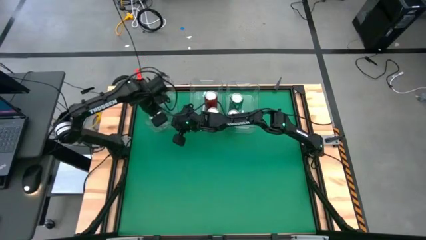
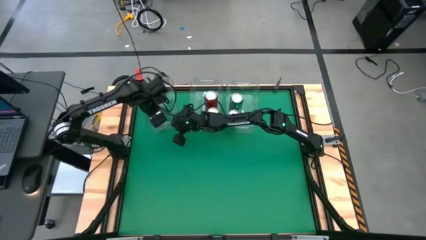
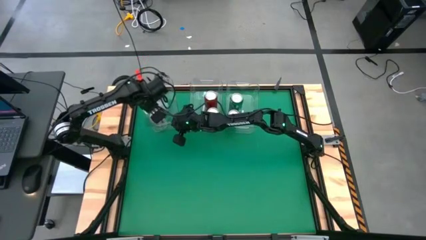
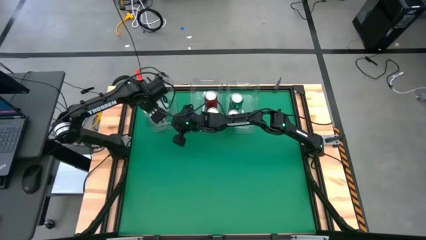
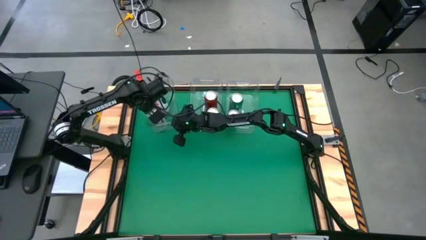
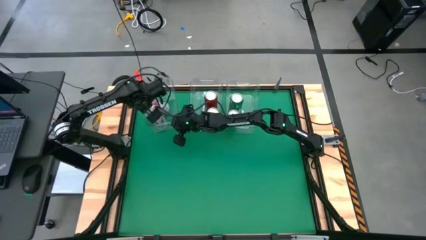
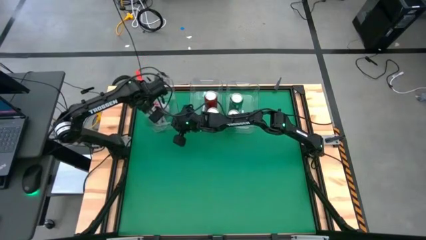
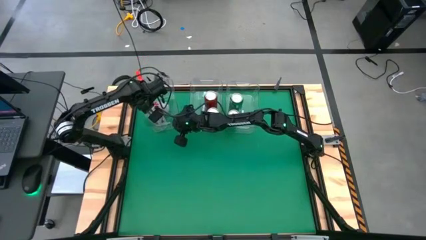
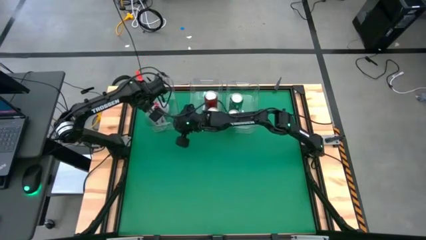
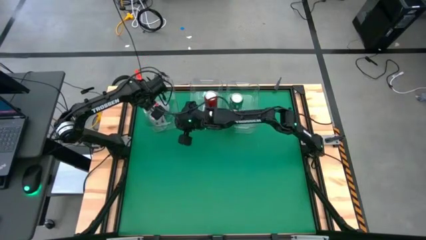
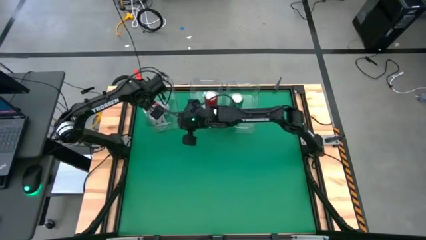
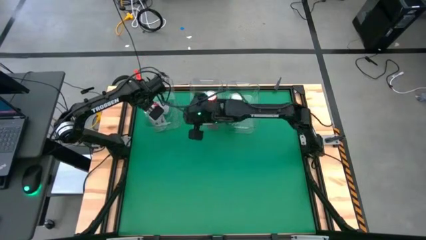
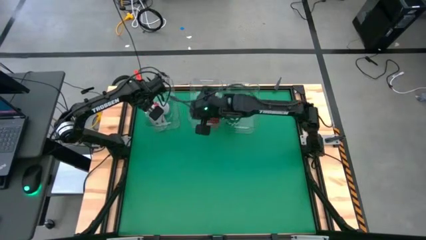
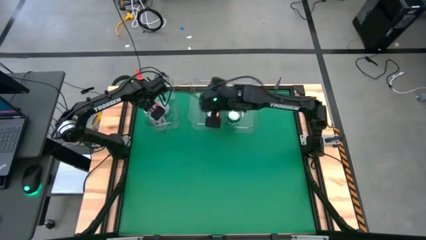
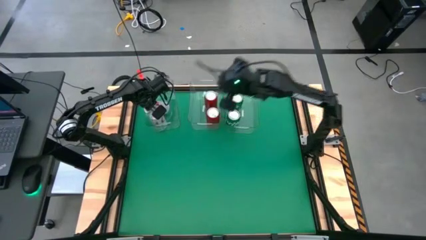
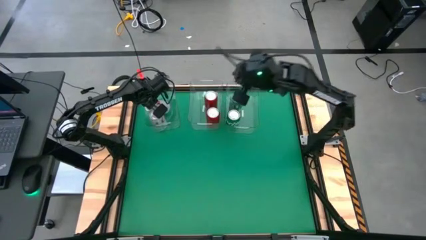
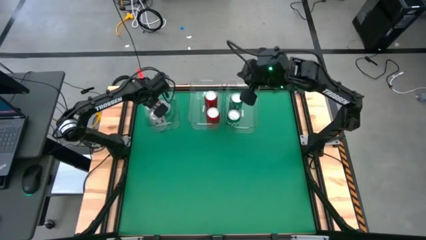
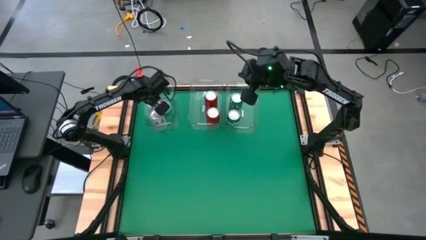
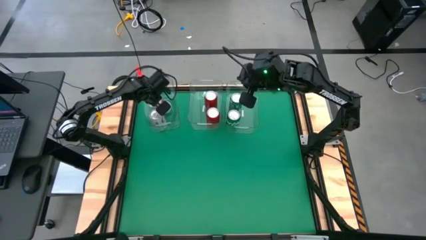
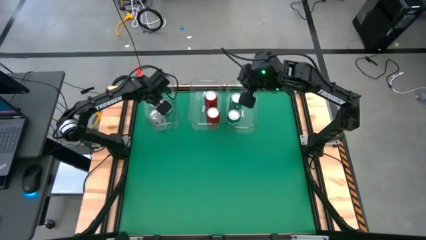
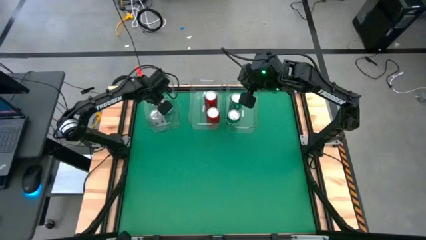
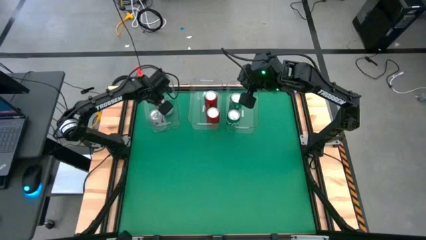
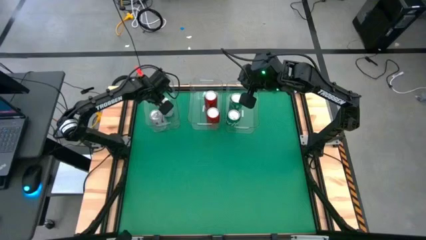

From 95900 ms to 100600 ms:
Task: Sort soda cans
Adjust the top silver-red-black soda can

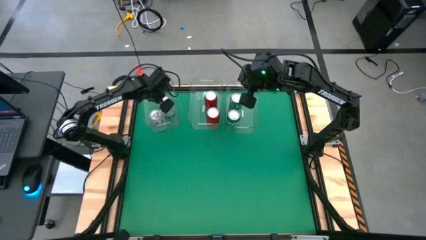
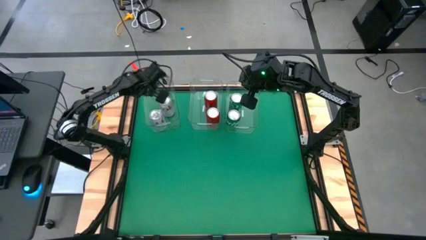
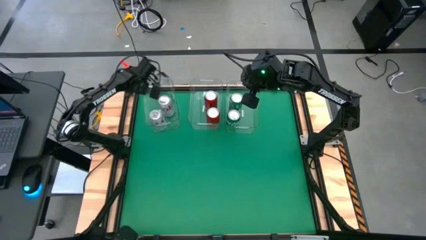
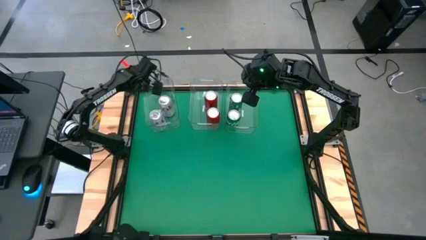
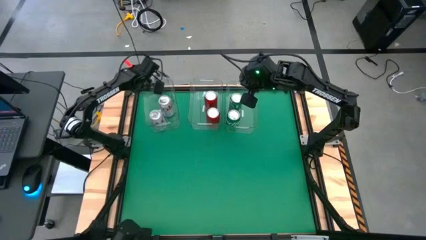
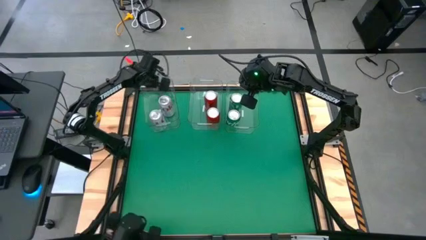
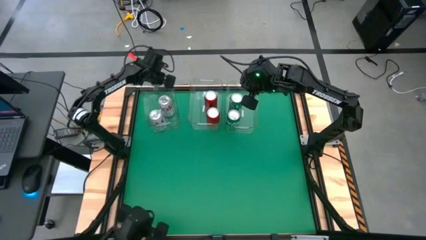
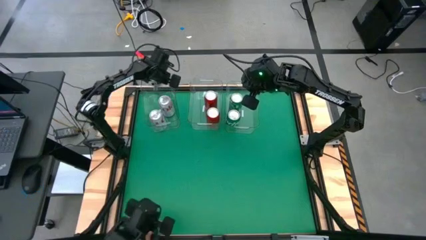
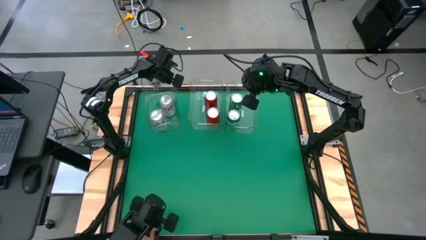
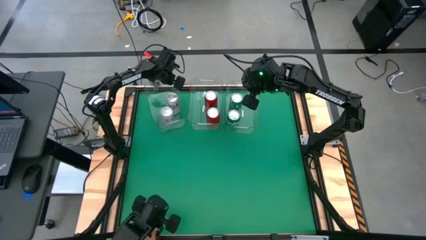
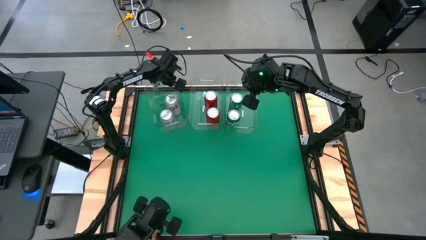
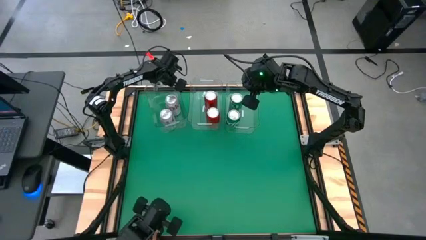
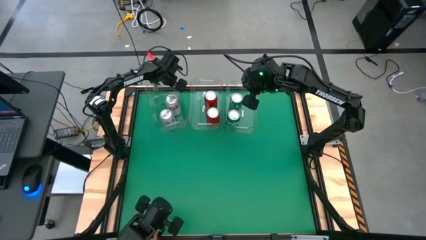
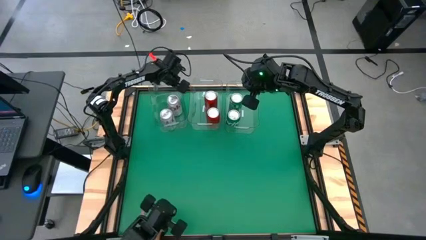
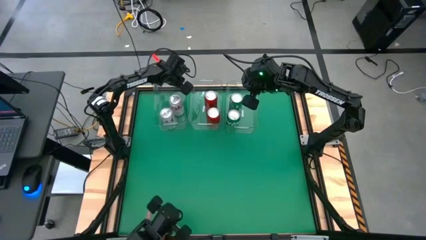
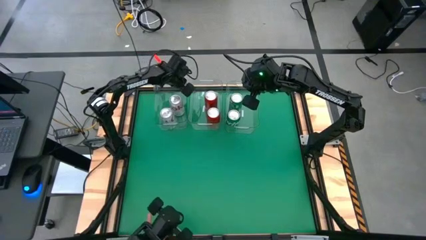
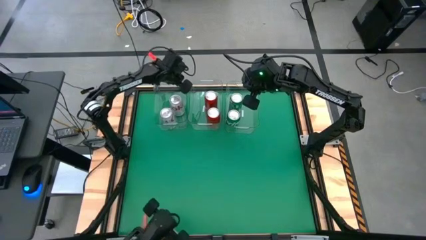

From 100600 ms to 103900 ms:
Move the left transparent bin to the left side of the middle transparent bin

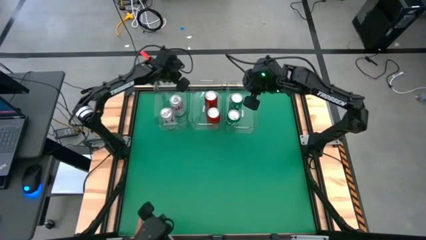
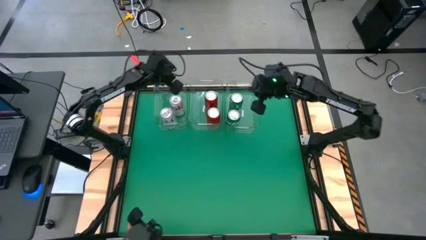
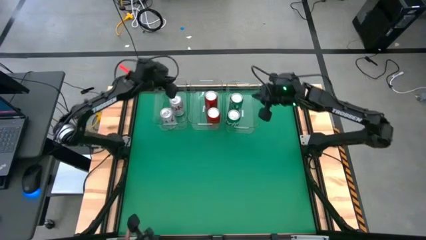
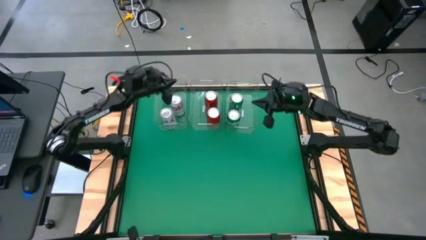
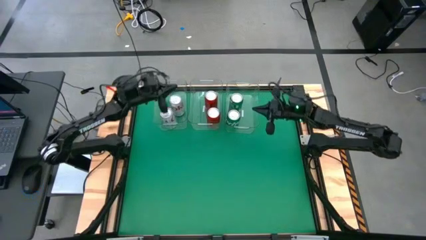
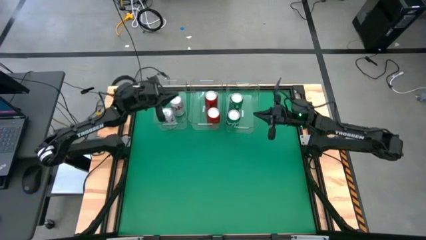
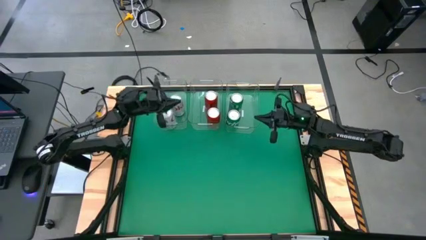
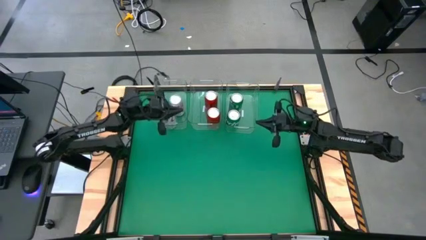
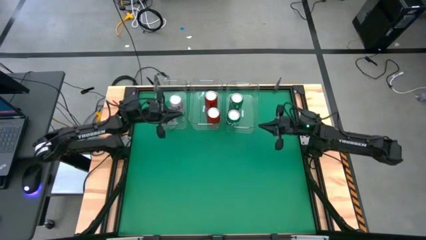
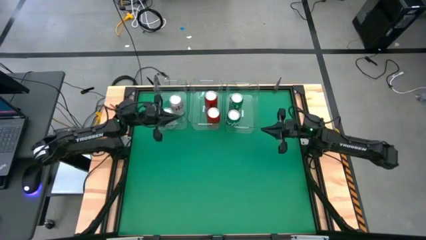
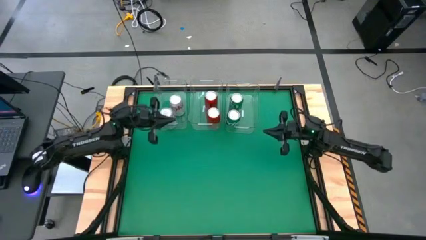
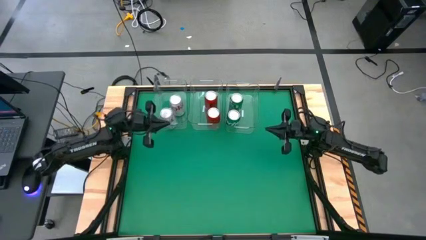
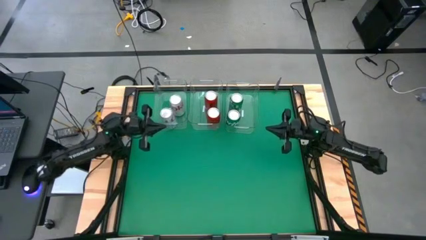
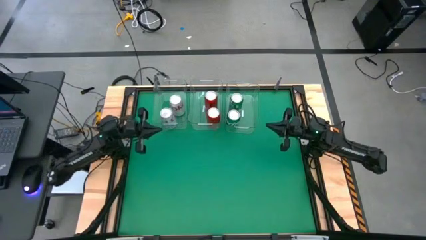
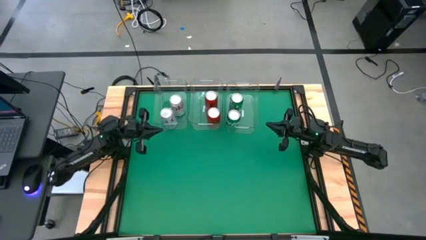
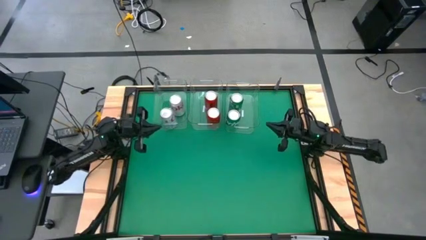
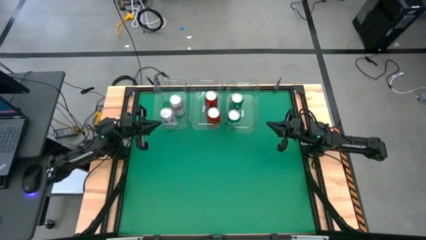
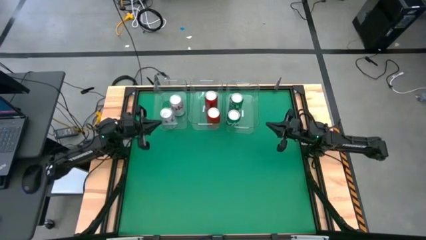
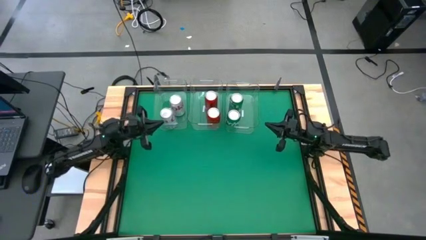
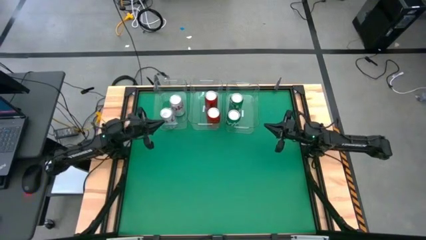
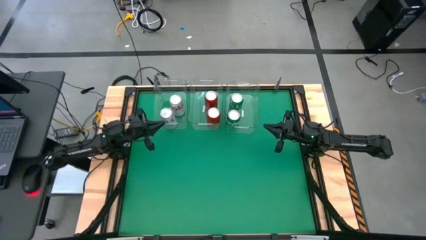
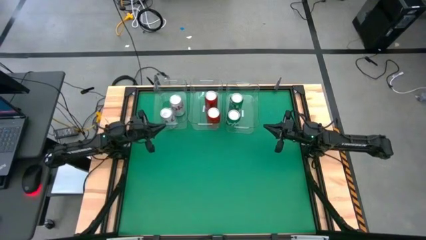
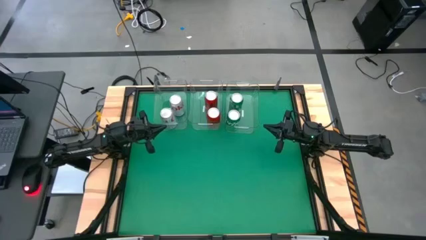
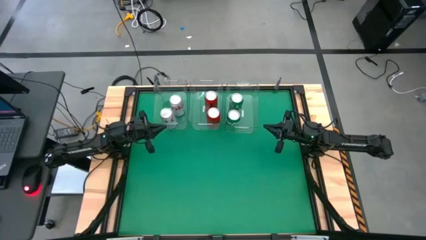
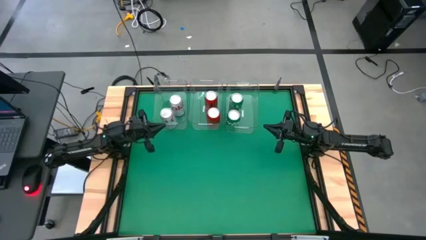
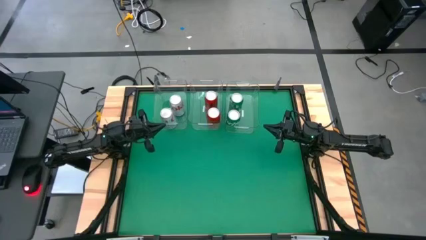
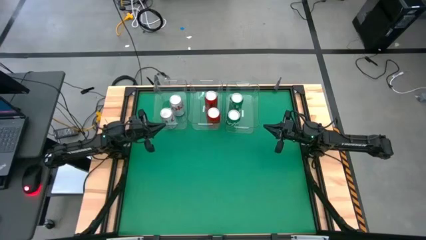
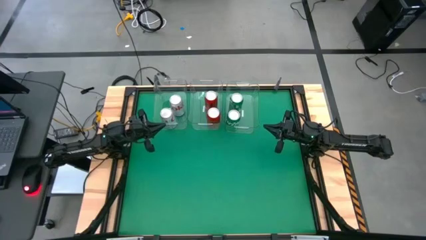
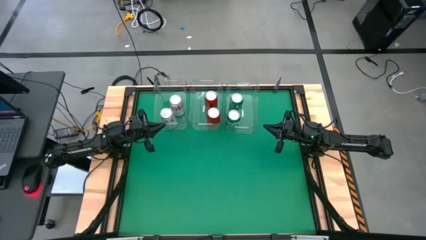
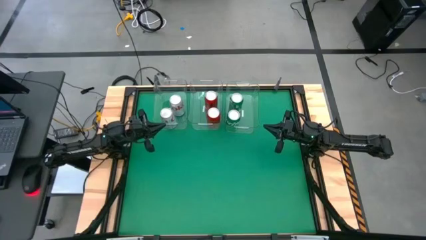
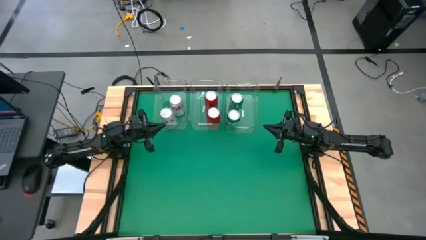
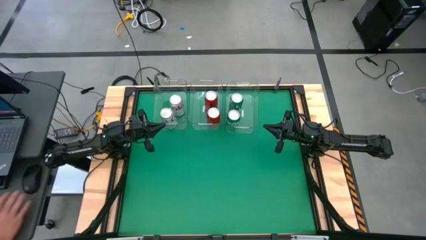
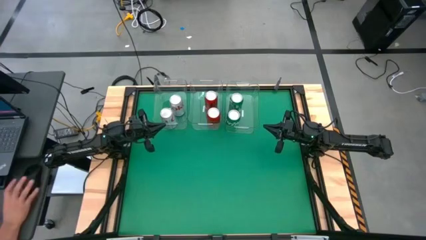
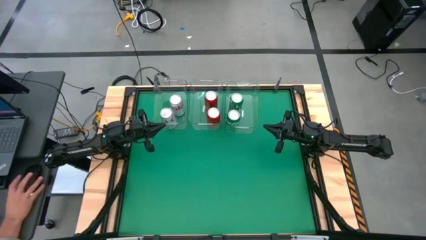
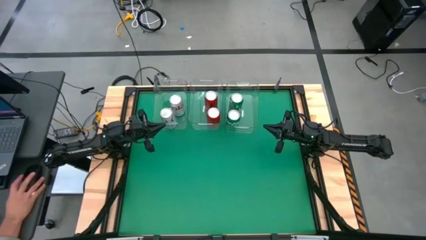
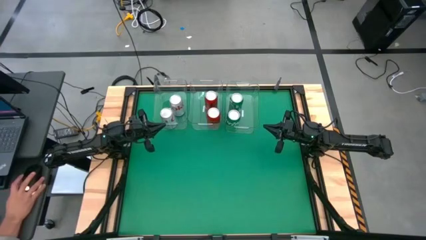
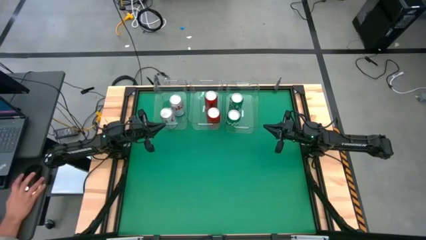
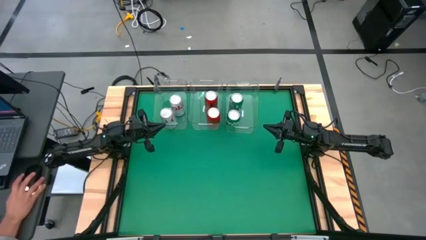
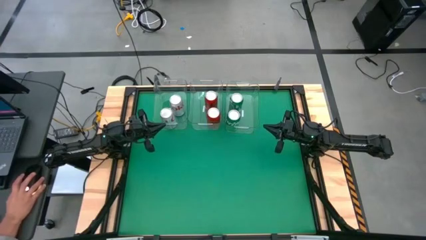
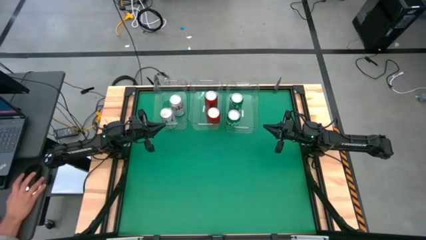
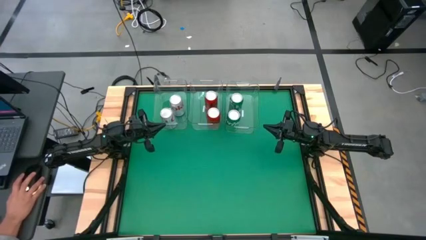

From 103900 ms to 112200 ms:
Return to Home Position
